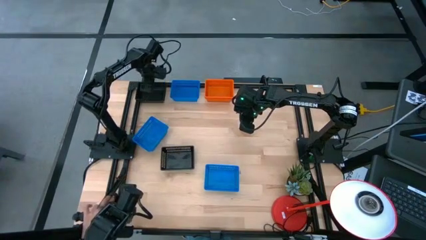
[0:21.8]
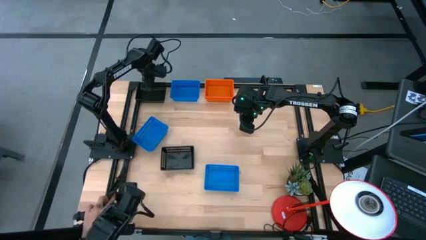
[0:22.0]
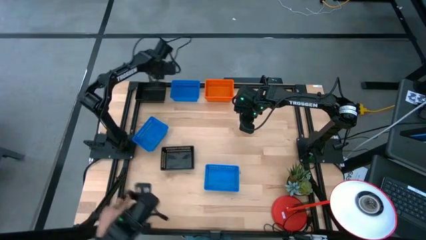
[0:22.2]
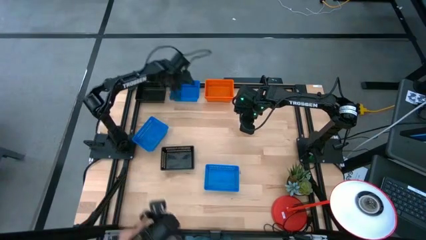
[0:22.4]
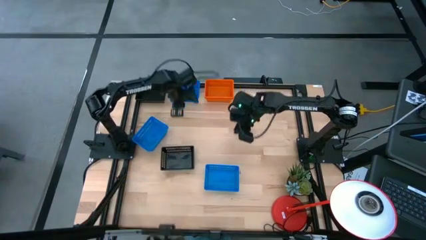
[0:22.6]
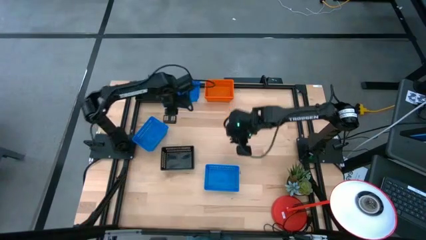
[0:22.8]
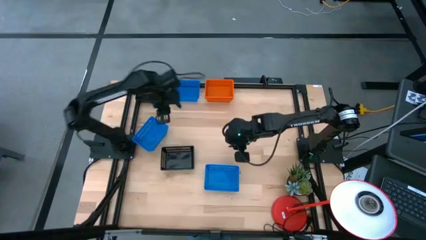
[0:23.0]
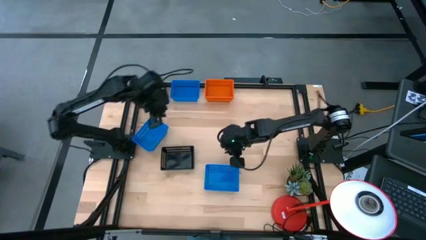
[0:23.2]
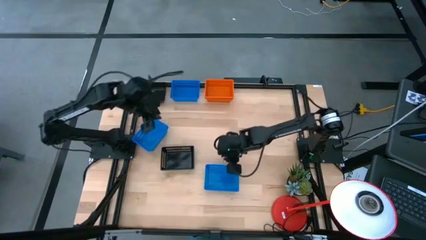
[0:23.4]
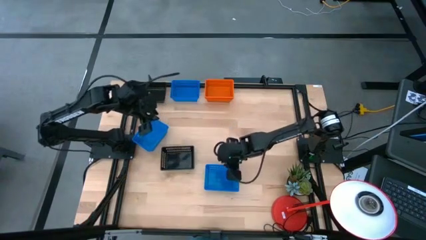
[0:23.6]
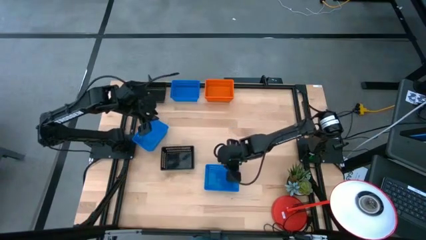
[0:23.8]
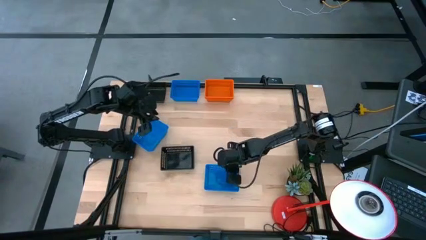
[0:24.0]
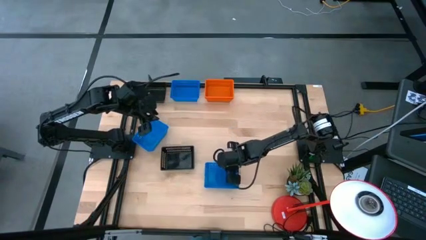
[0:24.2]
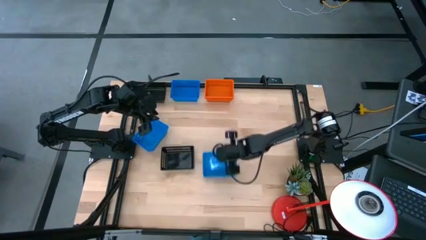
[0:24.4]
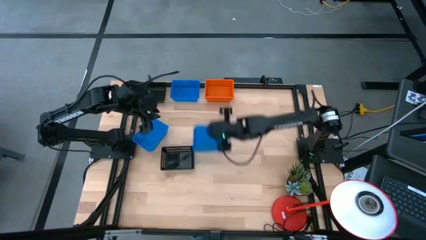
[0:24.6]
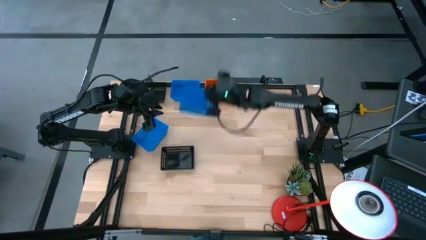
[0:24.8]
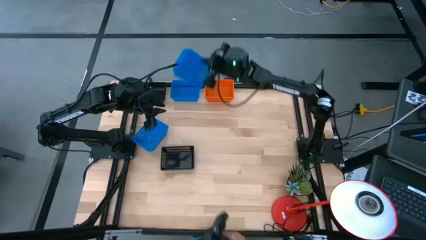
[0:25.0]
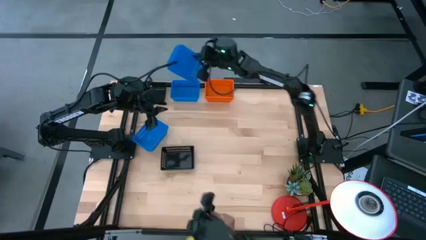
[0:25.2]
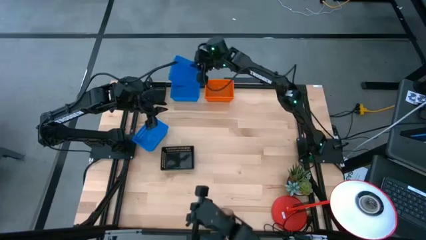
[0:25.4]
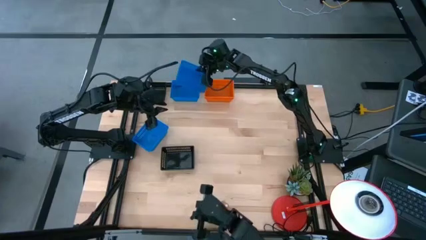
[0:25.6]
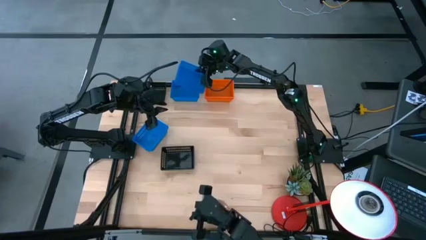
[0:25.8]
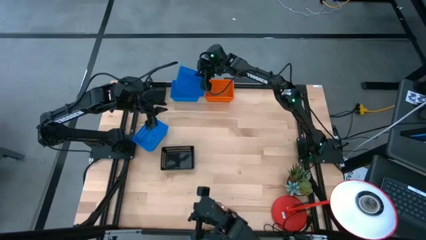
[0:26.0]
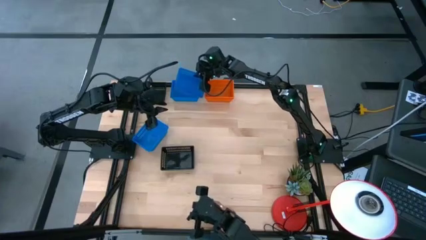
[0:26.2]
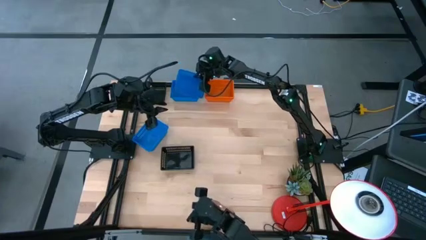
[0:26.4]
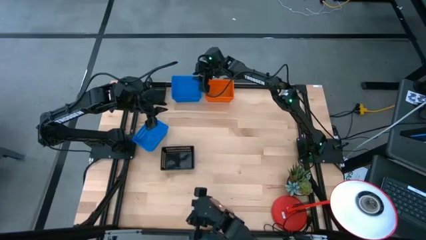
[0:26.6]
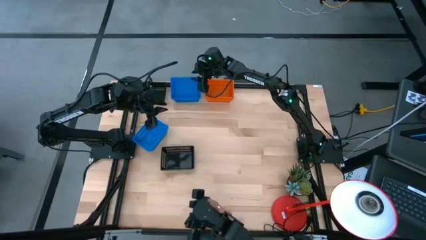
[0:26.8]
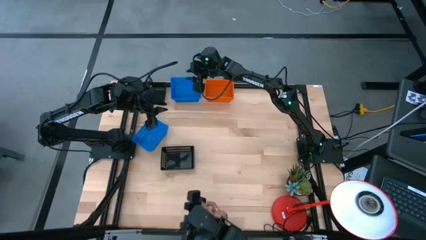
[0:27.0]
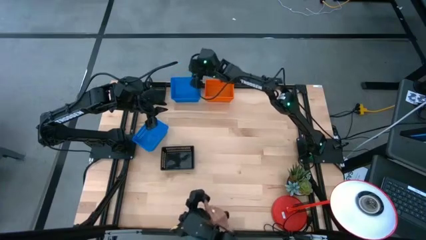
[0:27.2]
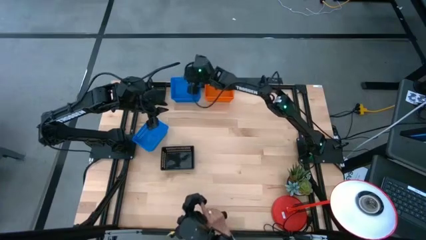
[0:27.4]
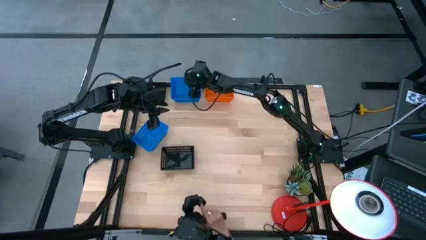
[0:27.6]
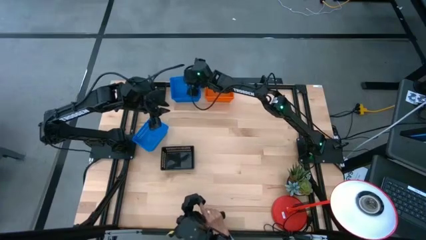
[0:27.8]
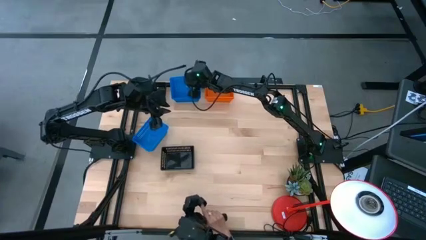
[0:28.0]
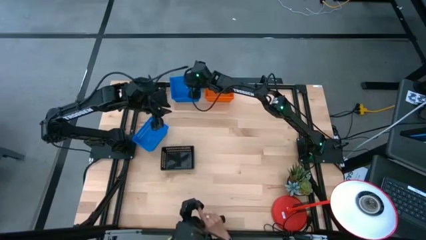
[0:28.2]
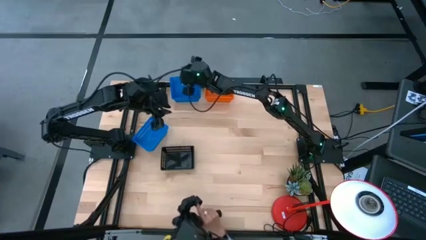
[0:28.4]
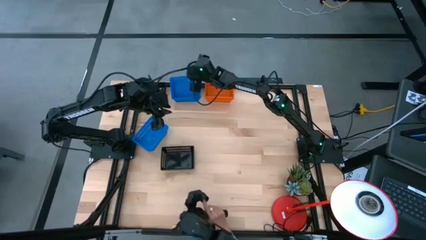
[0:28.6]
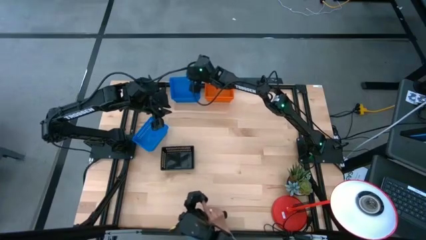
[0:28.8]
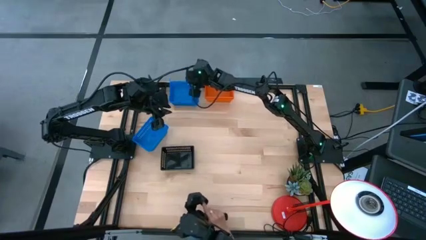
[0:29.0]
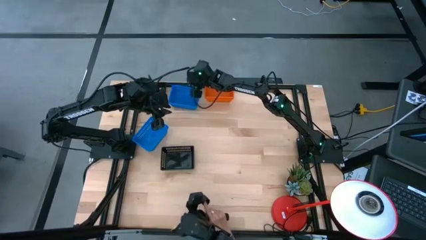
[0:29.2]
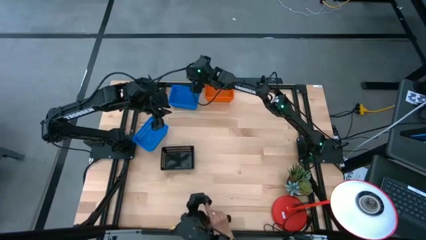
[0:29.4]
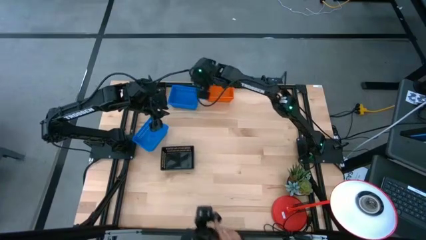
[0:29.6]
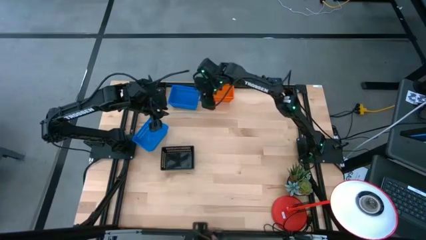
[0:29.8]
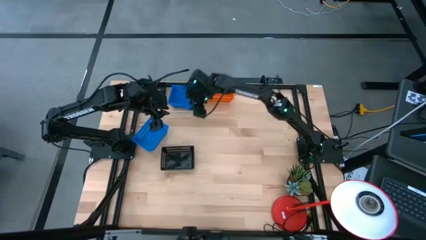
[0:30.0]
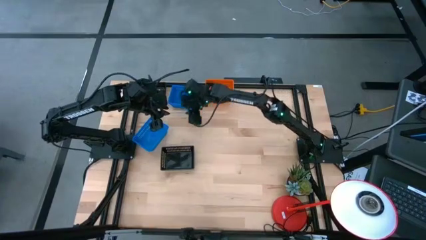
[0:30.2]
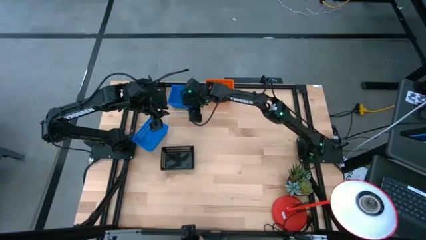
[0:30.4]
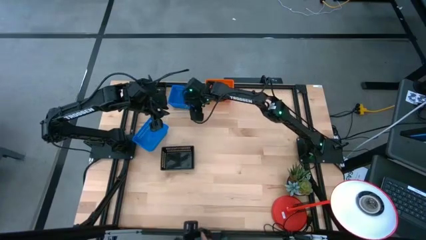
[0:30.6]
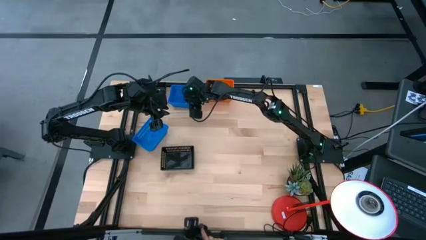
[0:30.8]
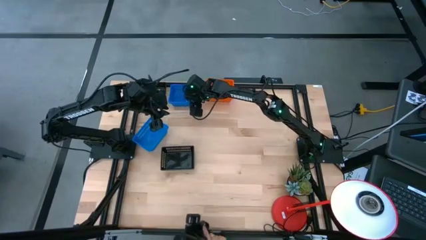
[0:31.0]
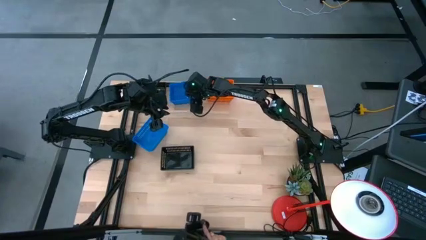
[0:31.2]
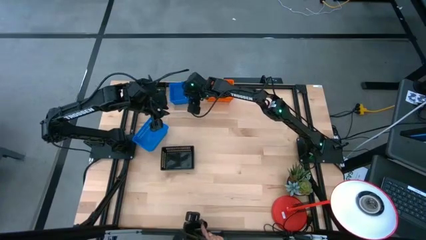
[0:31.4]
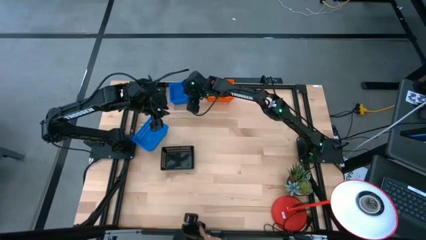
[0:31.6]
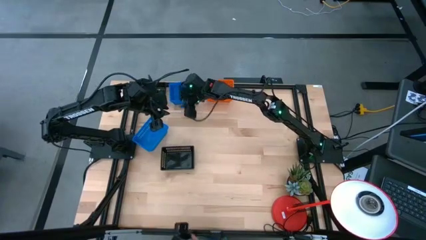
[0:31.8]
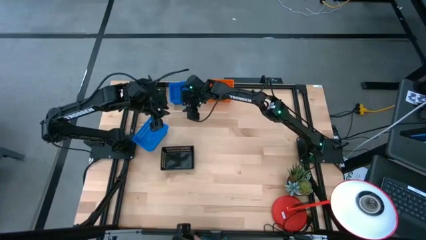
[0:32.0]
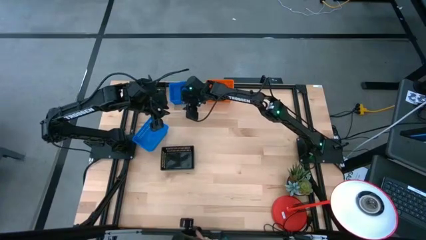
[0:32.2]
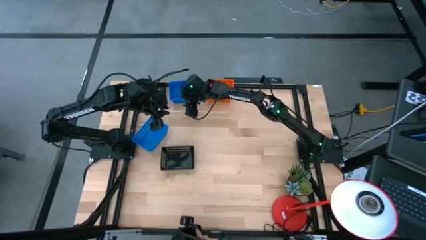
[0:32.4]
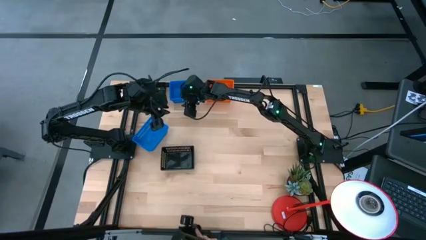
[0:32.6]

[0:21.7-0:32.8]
Stack the bottom blue bin on the top blue bin

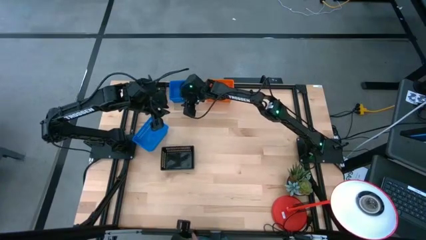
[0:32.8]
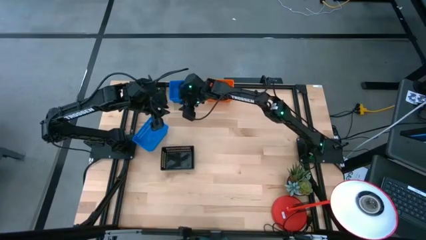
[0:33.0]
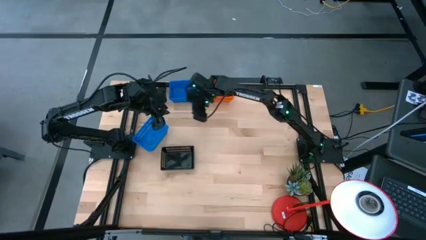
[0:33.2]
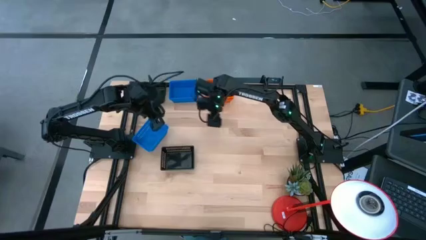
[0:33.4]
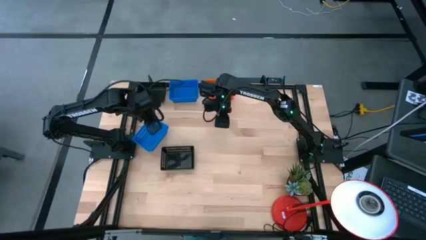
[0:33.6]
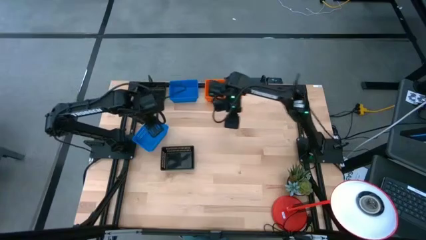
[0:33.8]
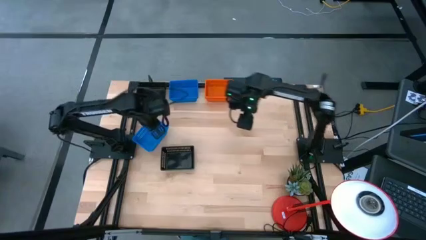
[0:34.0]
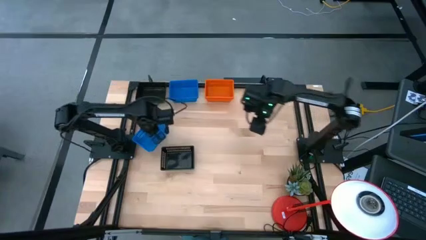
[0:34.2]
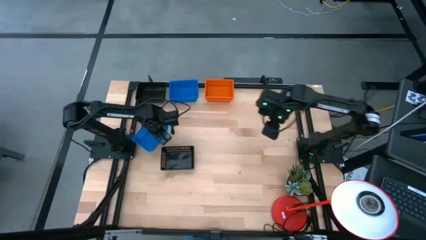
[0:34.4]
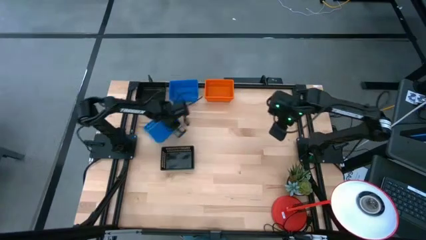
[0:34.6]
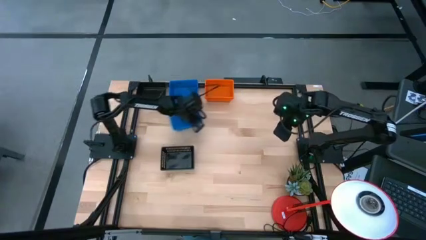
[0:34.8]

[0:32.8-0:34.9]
Move the blue basket to the middle of the table

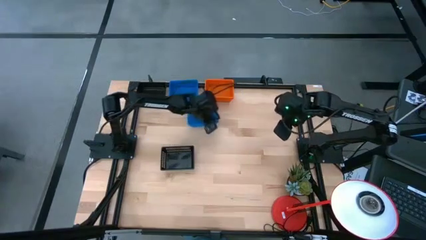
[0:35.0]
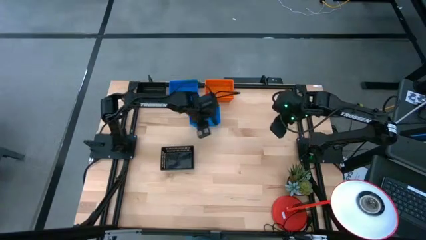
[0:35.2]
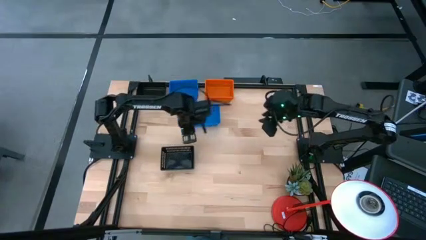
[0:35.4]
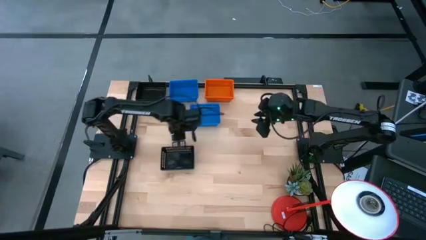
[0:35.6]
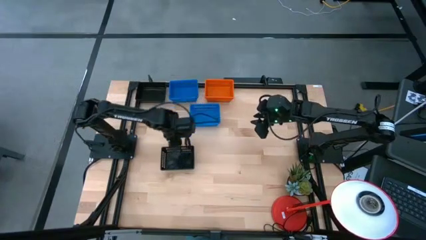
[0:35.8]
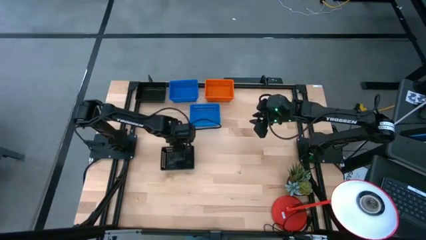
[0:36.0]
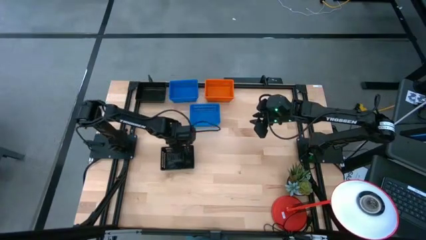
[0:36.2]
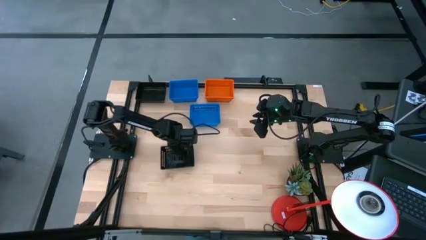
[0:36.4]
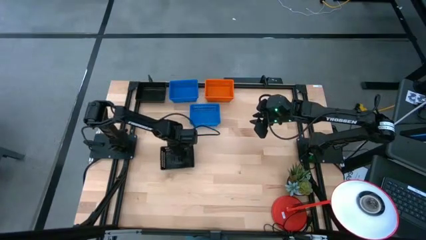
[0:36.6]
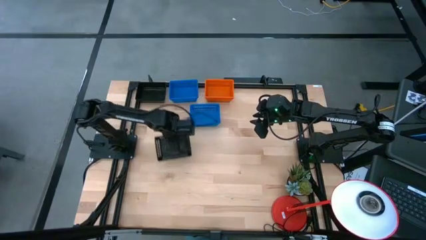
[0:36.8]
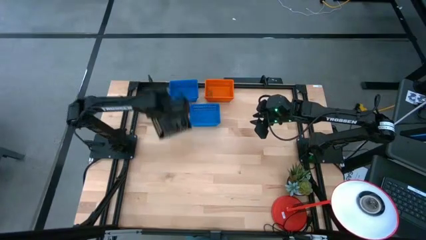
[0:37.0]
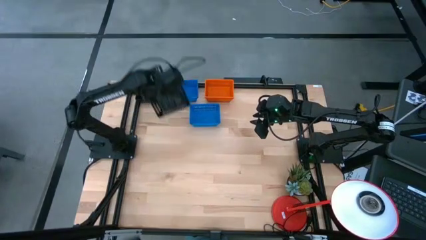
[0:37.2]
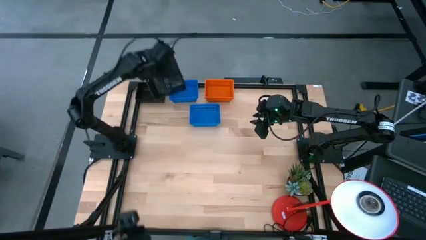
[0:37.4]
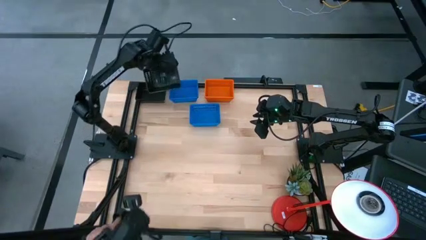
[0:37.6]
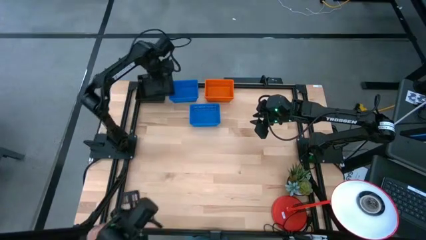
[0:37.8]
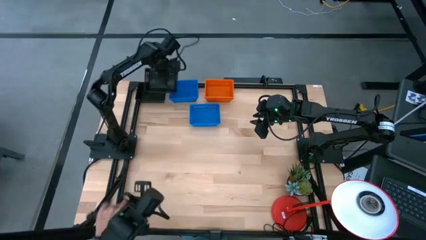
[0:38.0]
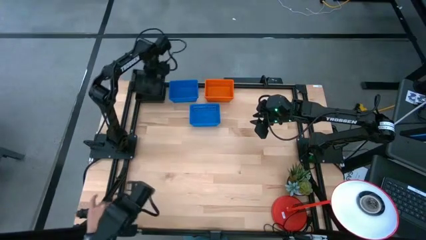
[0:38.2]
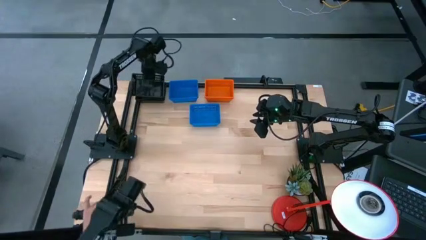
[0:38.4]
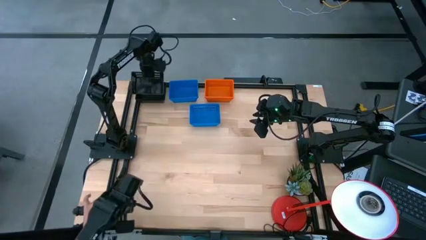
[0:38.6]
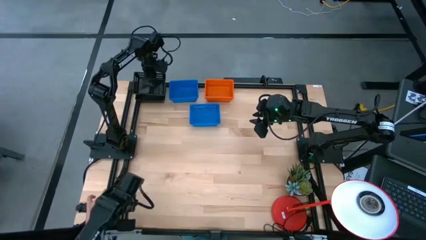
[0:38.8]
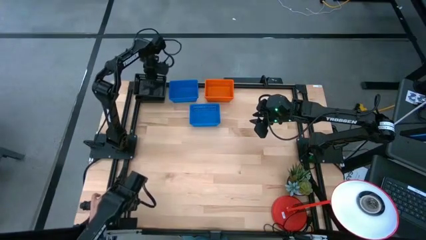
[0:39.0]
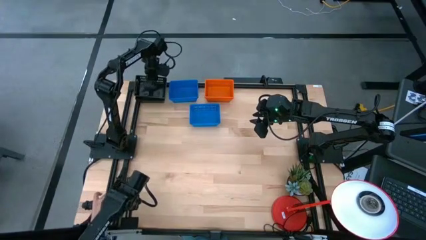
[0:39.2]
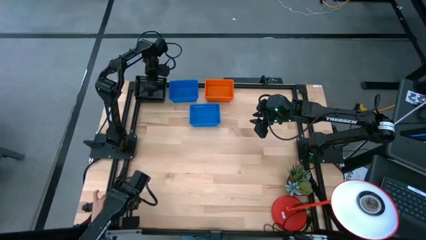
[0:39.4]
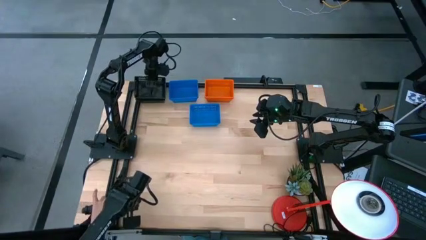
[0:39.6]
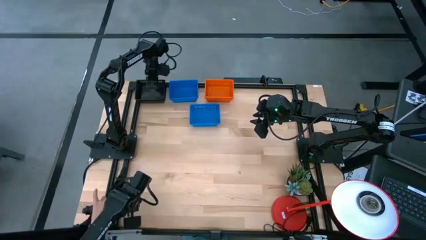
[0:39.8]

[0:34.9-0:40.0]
Stack the bottom black bin on the top black bin
